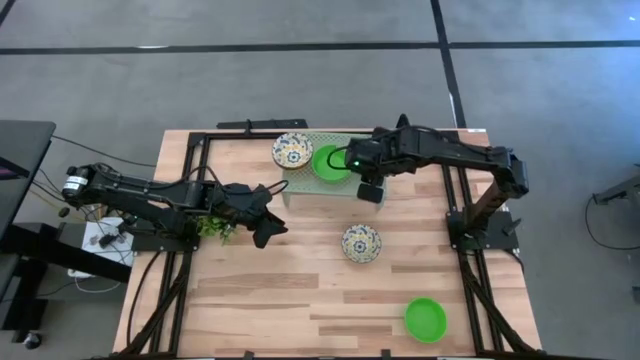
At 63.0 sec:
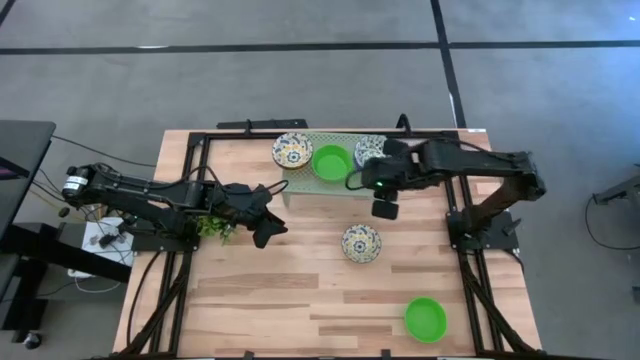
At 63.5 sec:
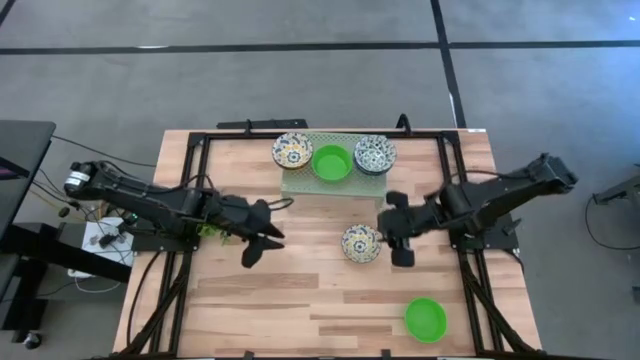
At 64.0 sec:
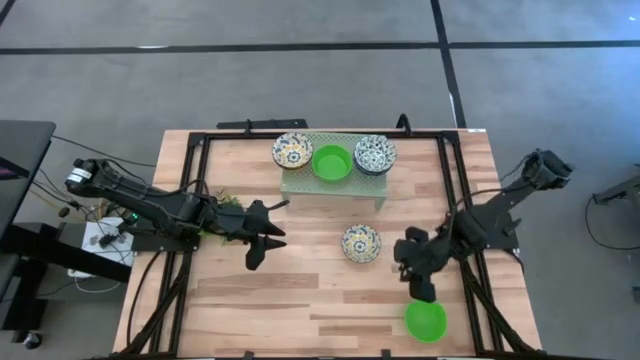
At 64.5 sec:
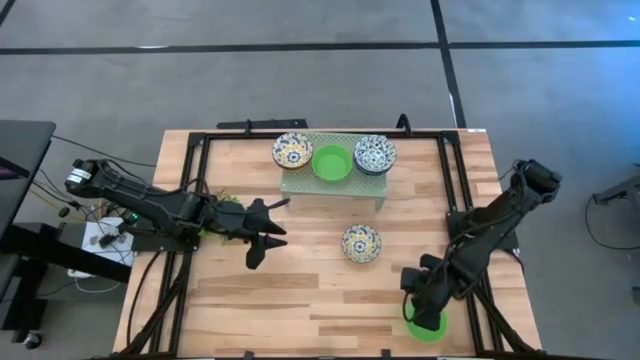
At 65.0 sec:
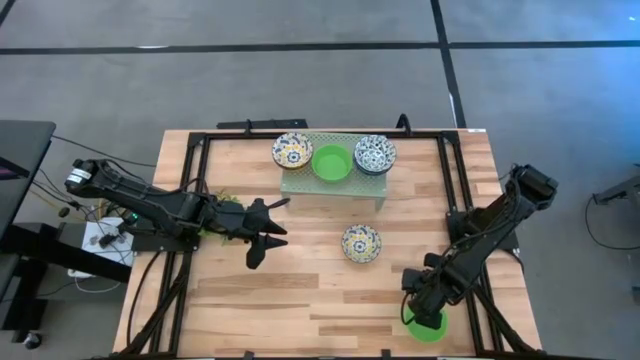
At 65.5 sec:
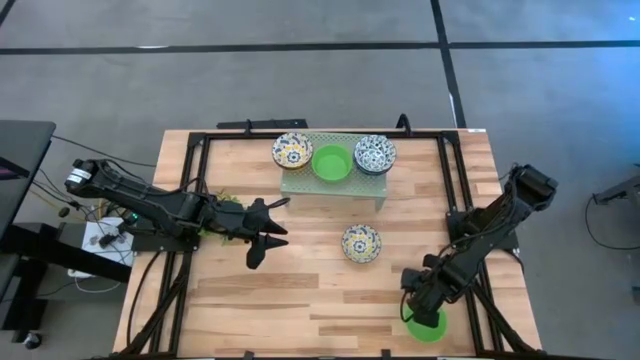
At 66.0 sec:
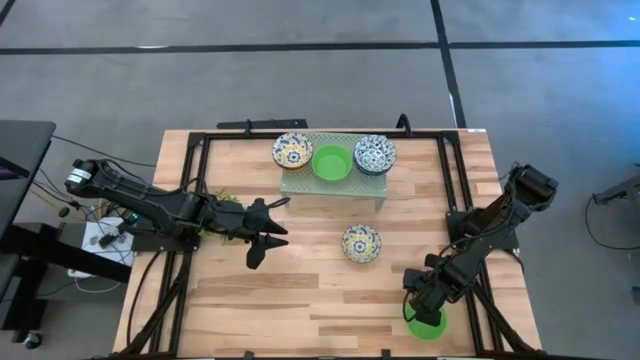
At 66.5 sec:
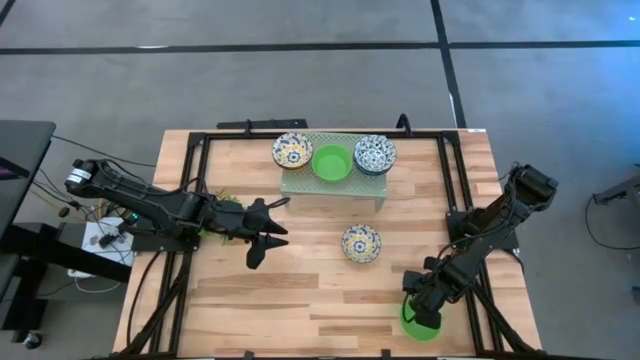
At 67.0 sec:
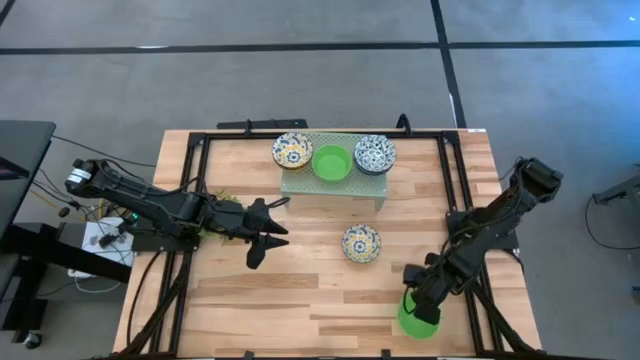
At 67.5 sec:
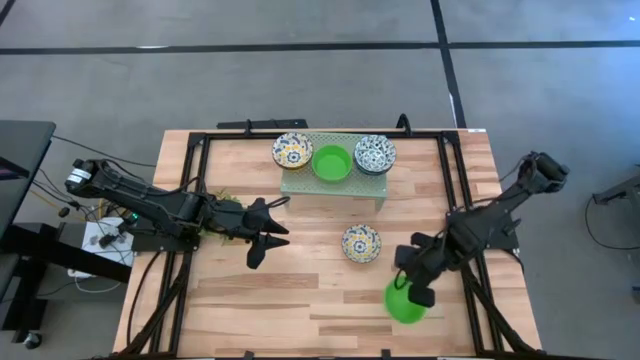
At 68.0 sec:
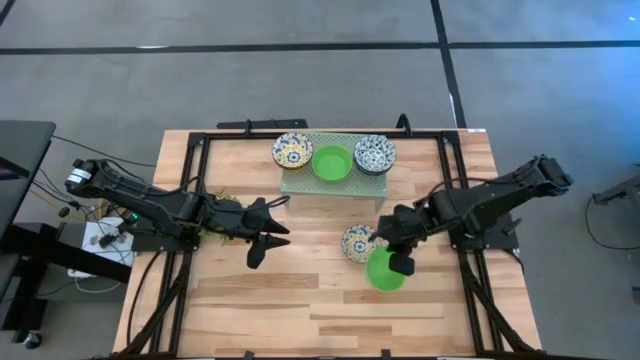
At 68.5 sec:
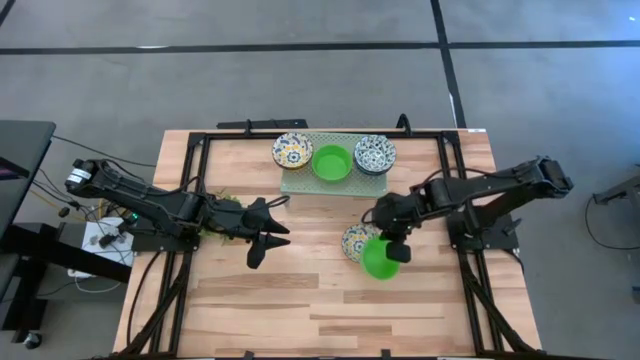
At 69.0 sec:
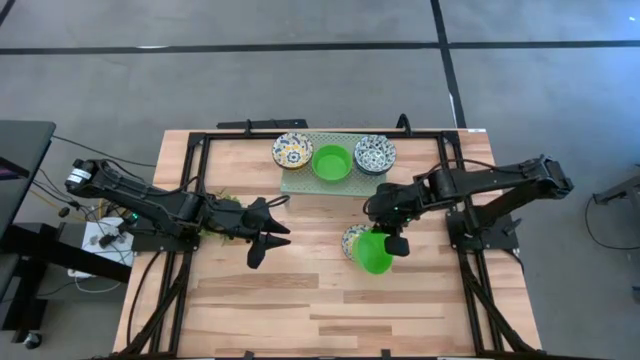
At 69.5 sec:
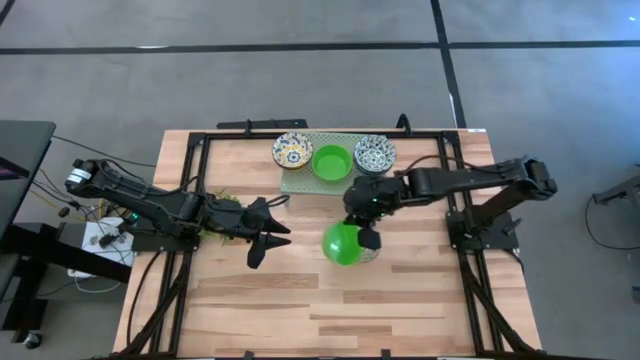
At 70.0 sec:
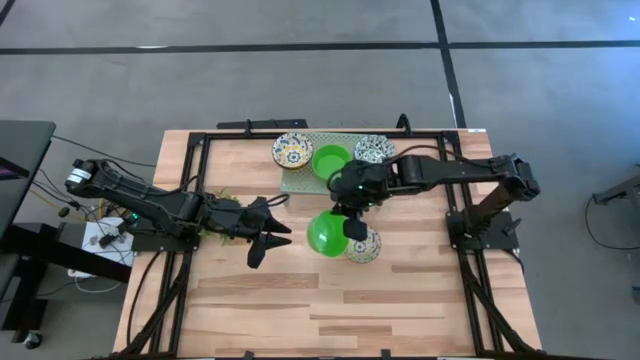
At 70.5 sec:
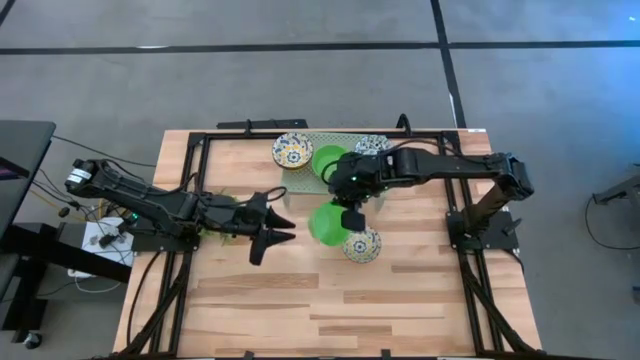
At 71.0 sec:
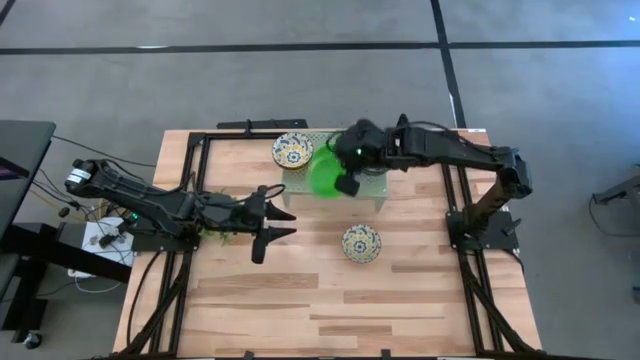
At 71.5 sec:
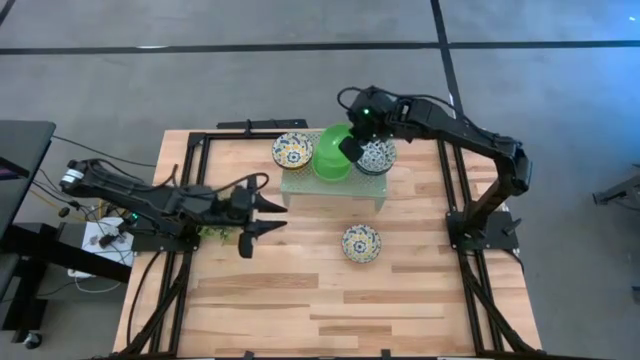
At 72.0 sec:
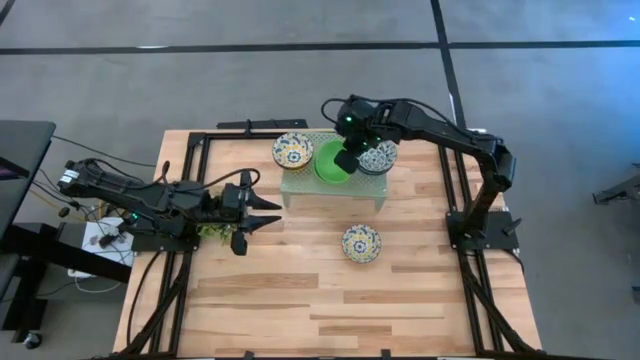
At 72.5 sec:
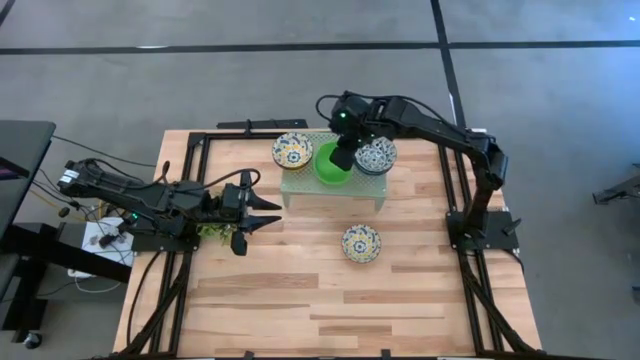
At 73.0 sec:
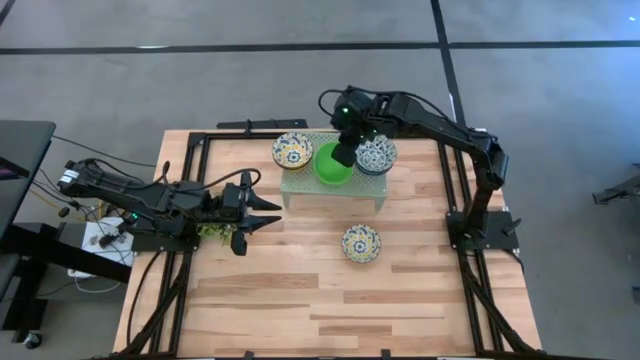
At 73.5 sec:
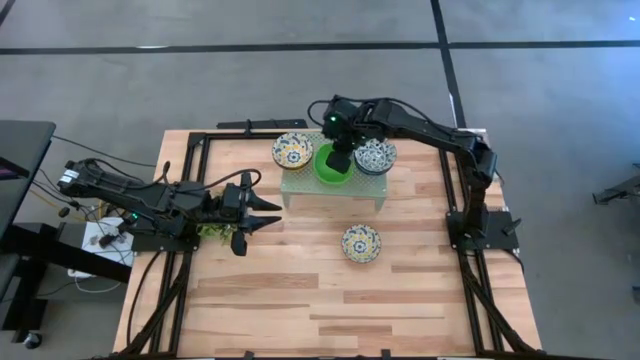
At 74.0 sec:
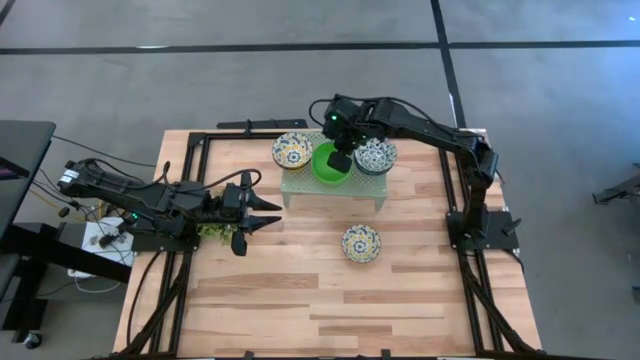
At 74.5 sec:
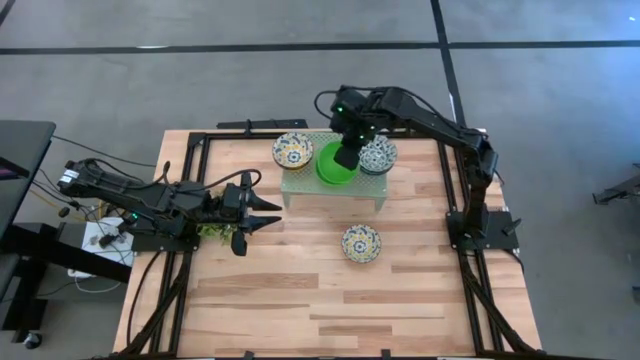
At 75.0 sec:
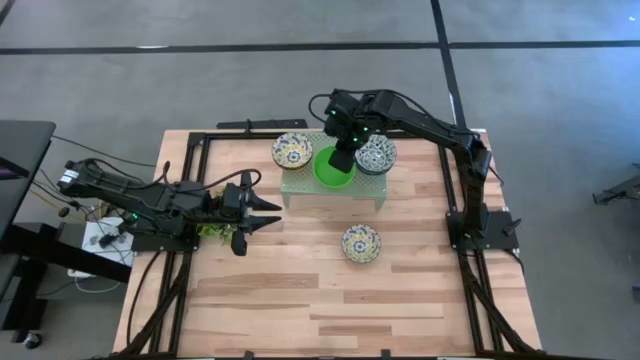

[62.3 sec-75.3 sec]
Task: Pick & Place Mini bowls
Stack the green bowl on the green bowl on the shelf

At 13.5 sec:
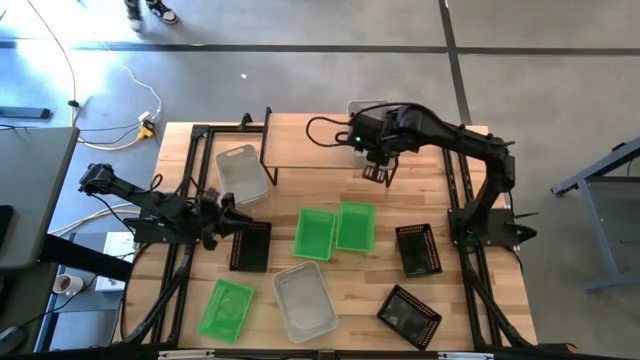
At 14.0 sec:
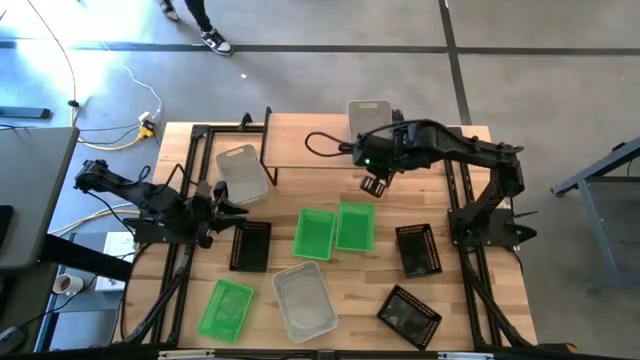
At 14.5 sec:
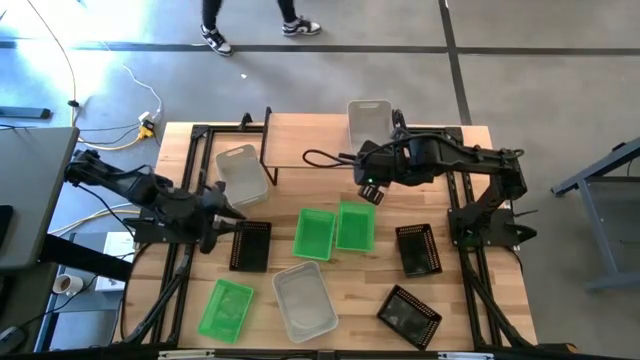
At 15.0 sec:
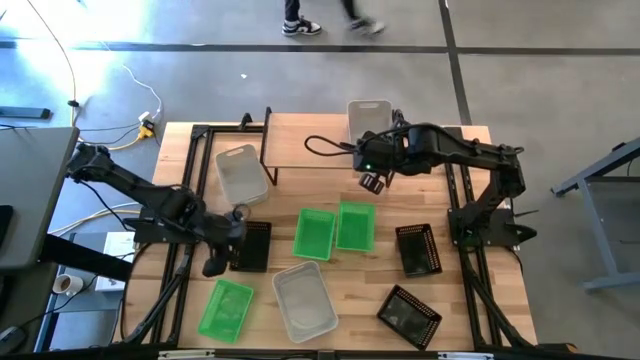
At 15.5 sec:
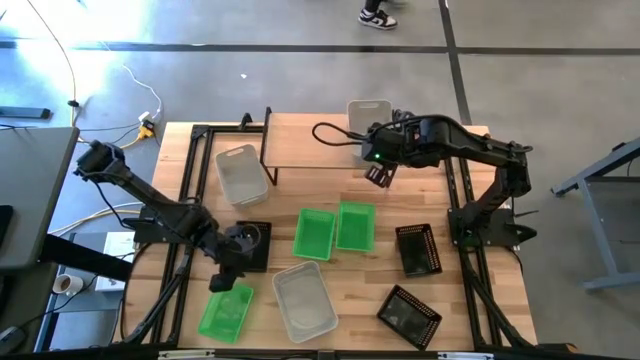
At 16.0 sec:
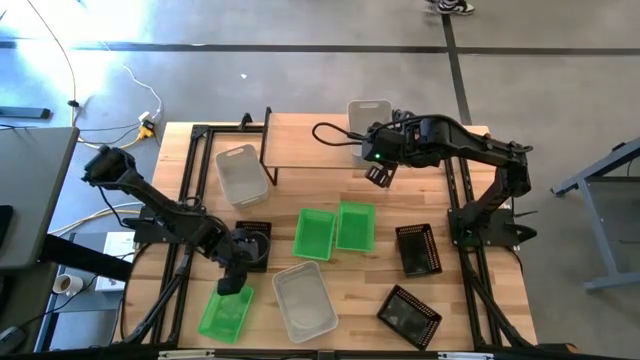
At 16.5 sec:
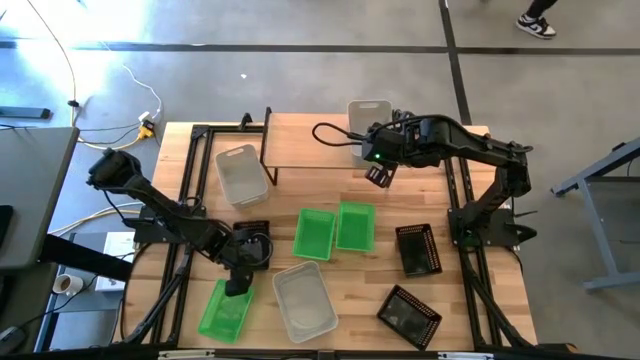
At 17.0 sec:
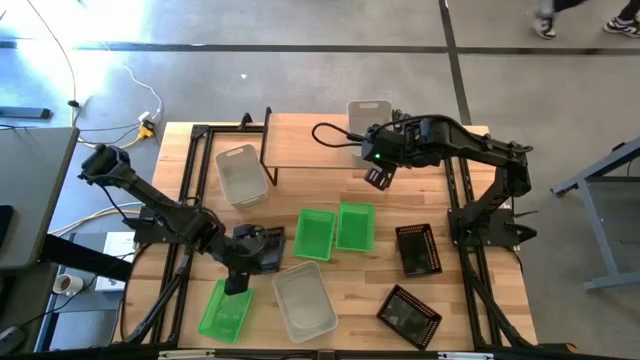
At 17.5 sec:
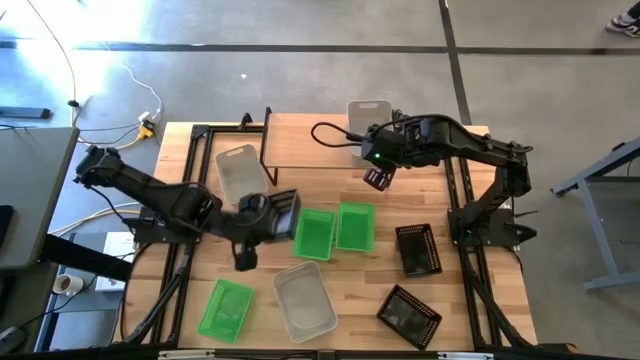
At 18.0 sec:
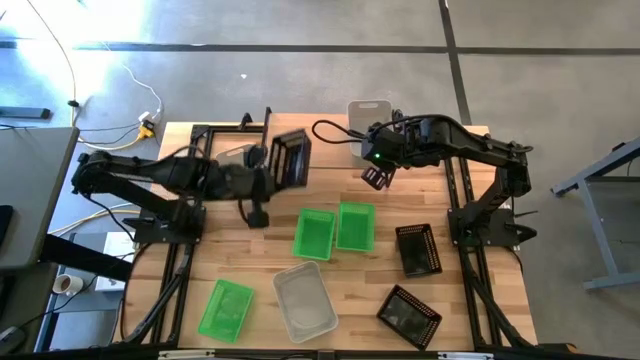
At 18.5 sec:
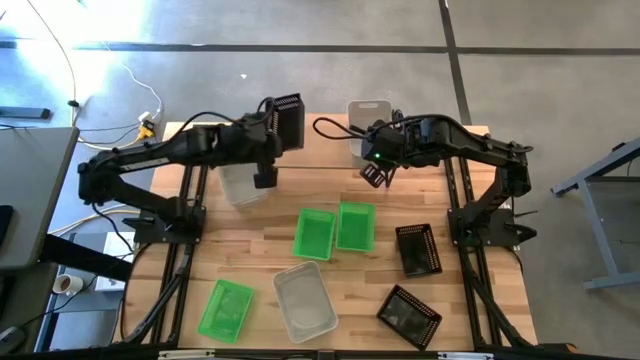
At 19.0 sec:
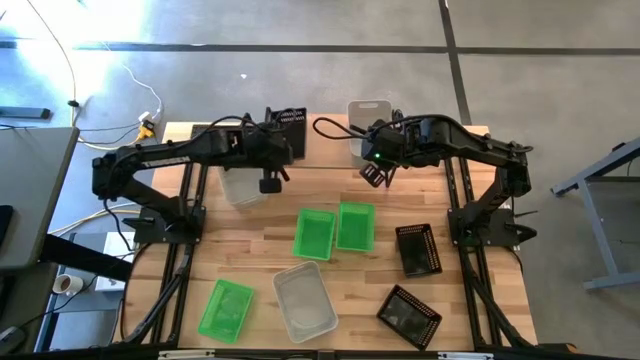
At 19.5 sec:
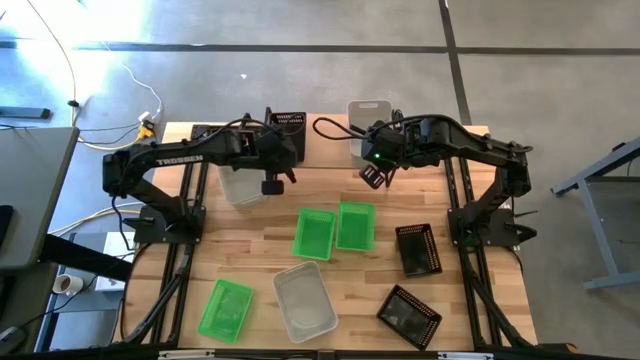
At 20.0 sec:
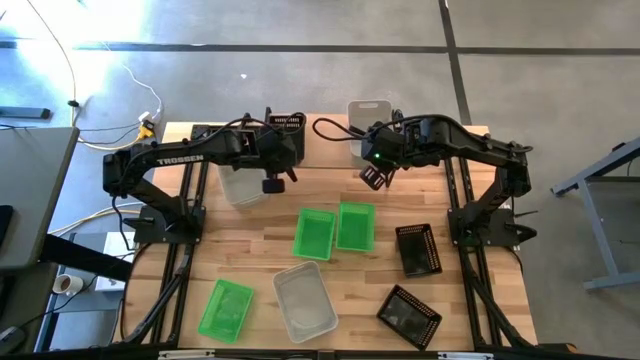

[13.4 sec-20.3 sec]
Task: Stack baskets on shelf by color
Put the top left black bin on the shelf
